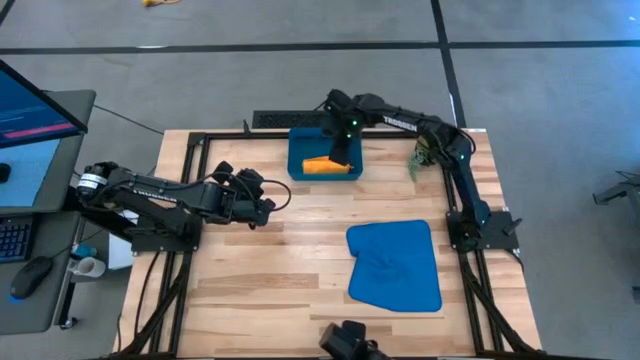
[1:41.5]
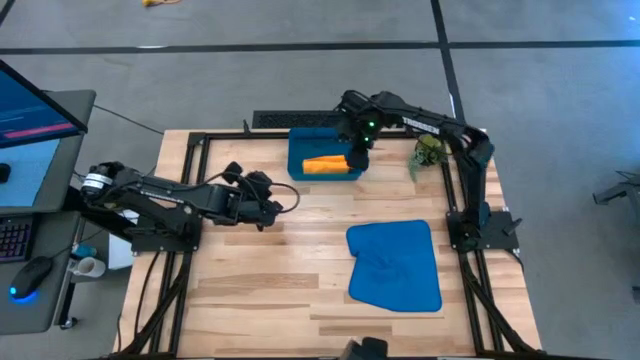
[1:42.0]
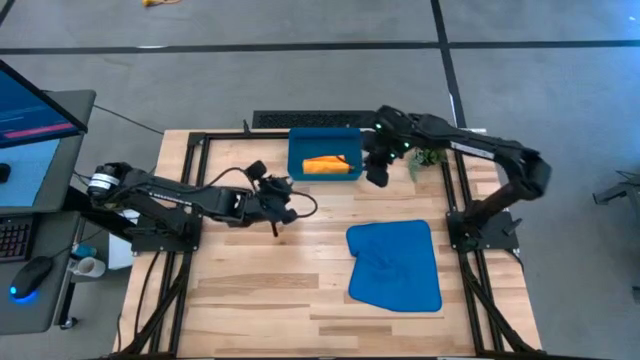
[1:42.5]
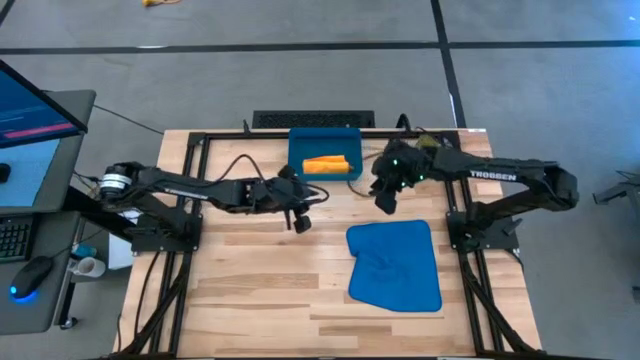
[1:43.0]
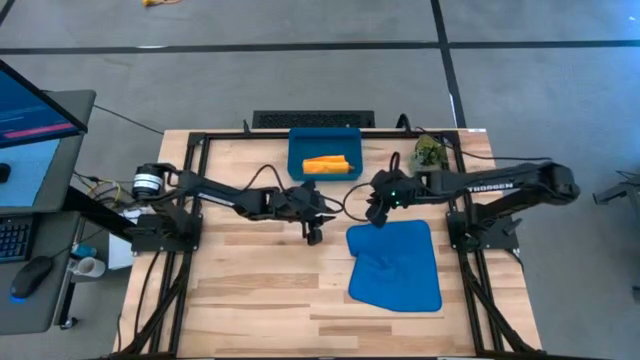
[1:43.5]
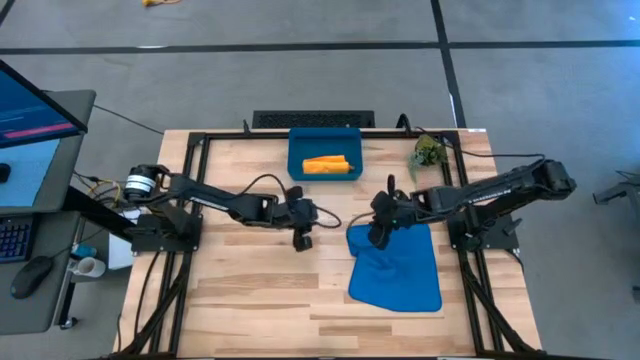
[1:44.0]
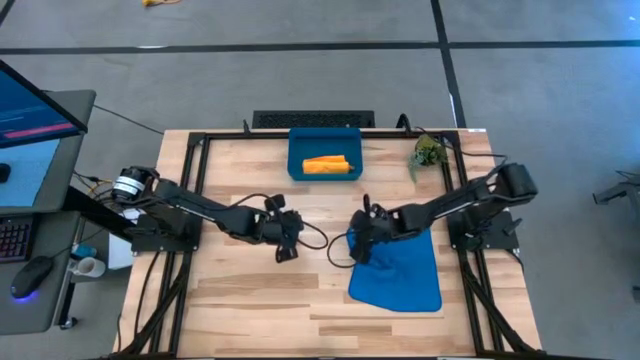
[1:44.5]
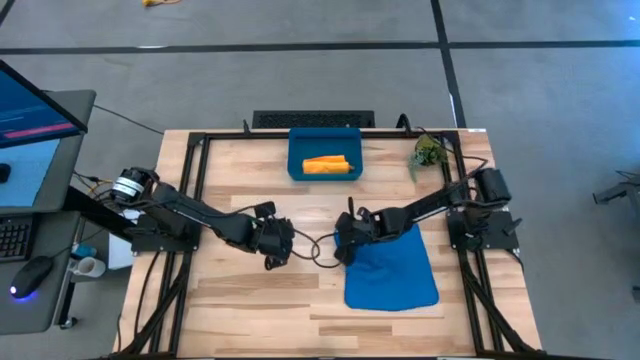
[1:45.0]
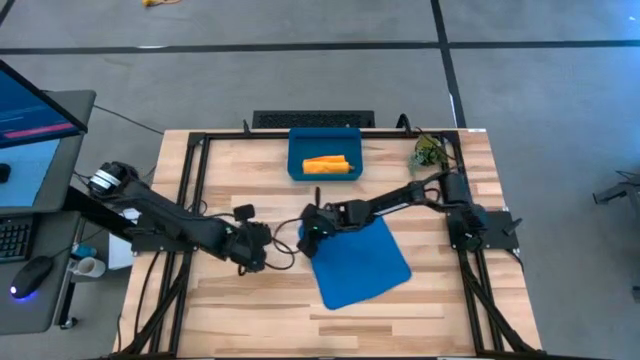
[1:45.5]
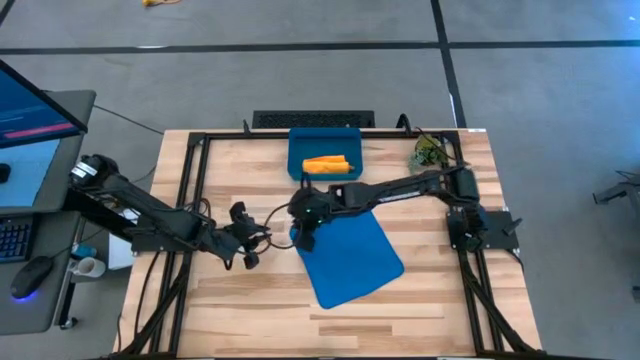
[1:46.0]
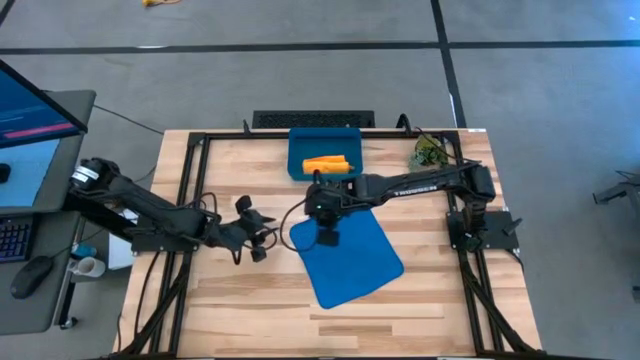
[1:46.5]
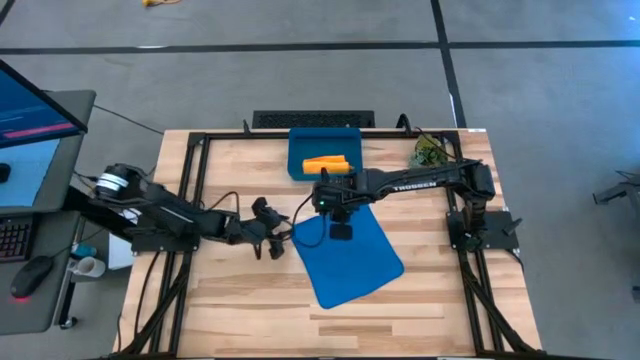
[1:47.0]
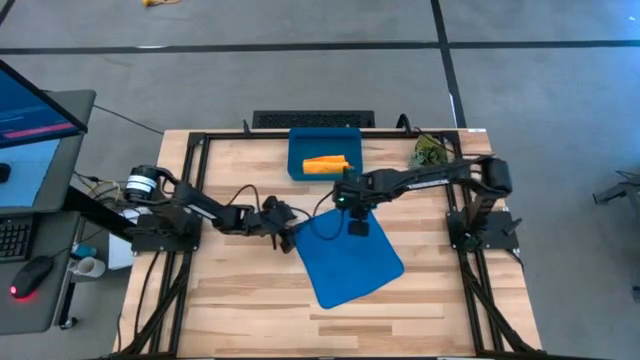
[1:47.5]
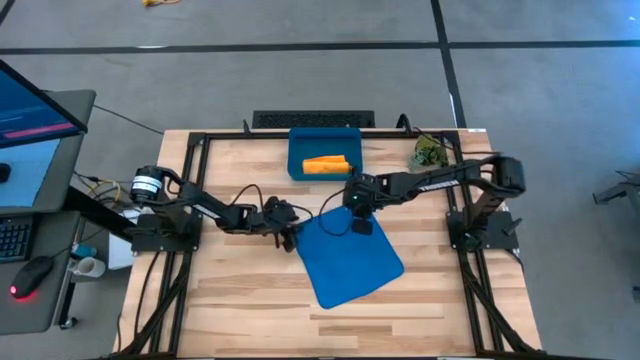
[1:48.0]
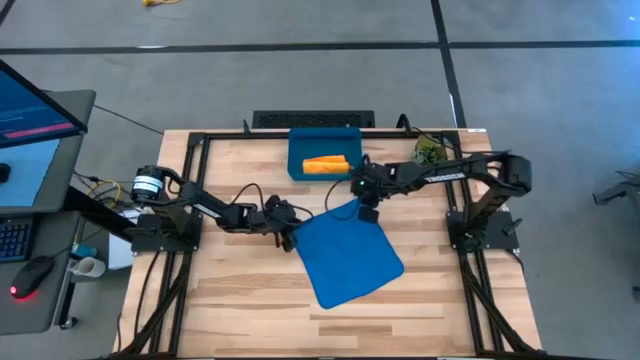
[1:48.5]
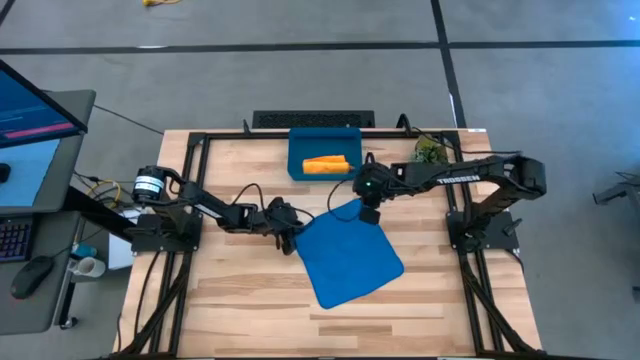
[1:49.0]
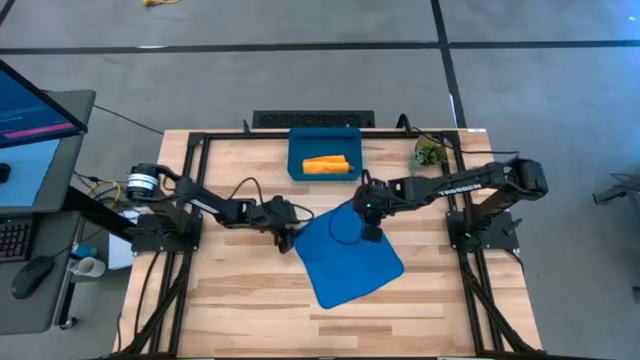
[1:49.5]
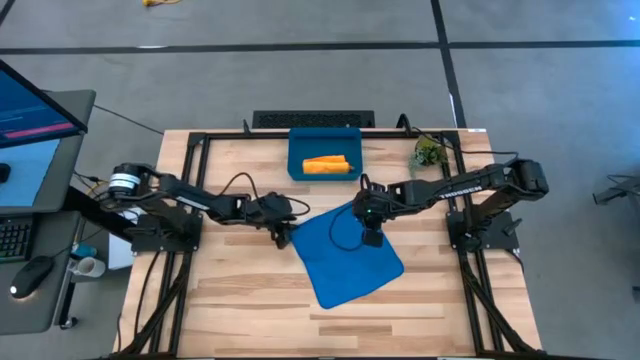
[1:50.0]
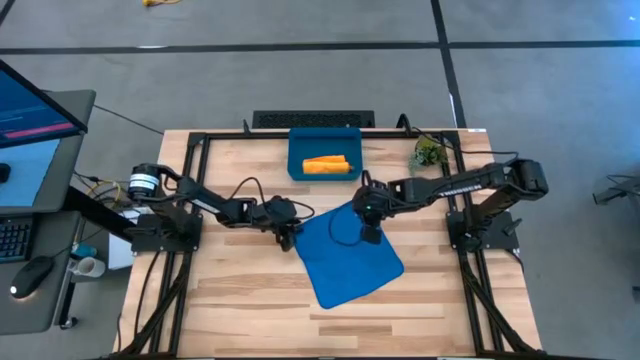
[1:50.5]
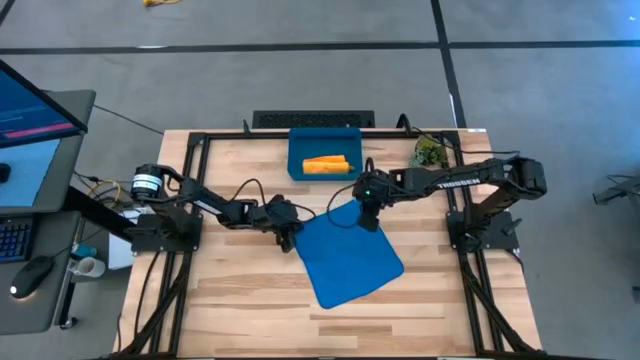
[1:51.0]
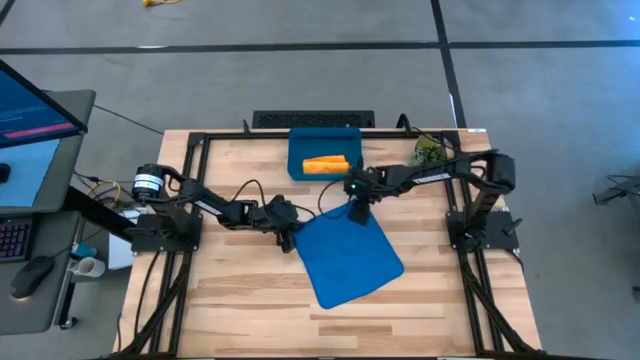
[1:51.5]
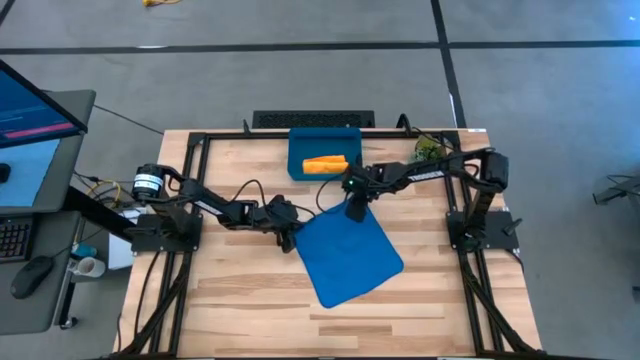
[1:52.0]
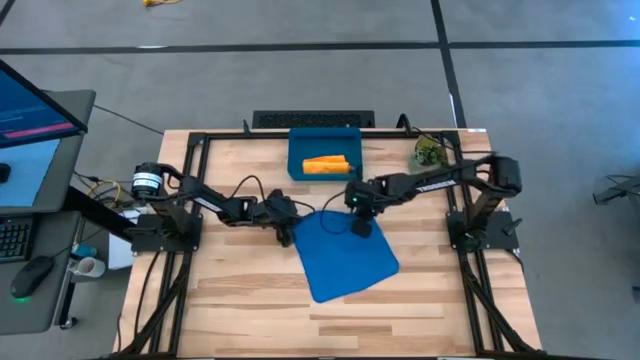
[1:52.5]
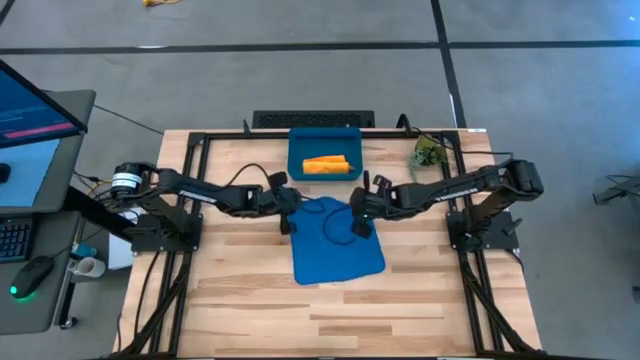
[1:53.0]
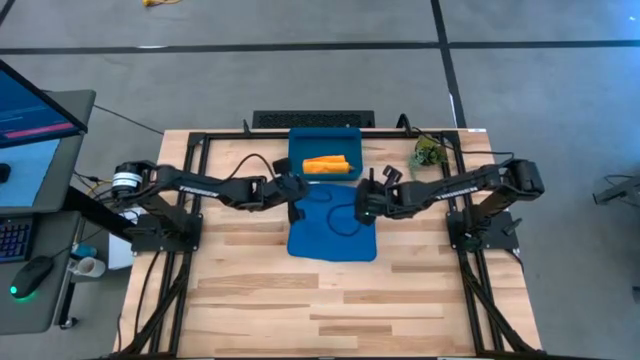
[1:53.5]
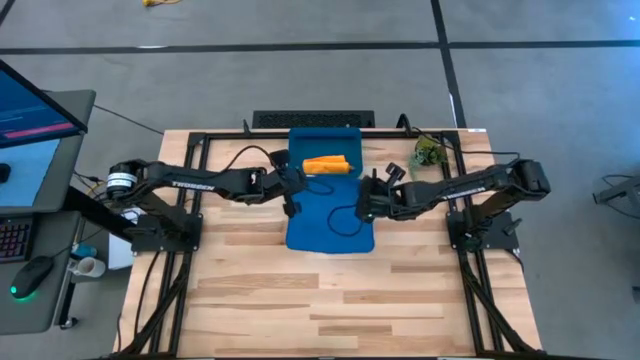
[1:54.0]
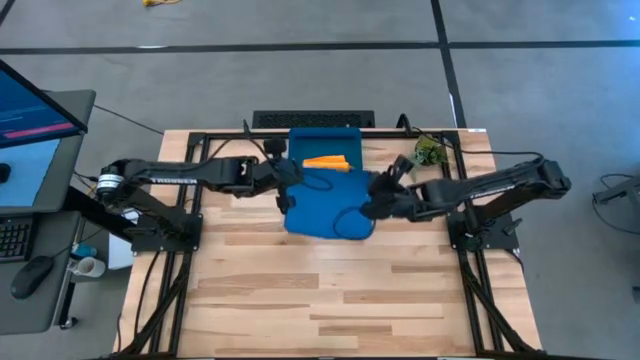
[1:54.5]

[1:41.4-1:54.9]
Task: Roll microfiber towels into tight, uniform cylinder then place into a basket
Fold the blue microfiber towel

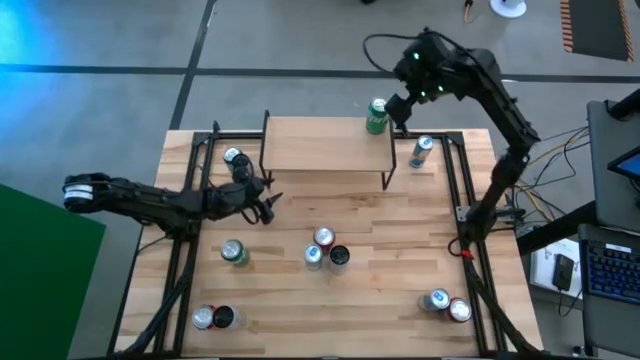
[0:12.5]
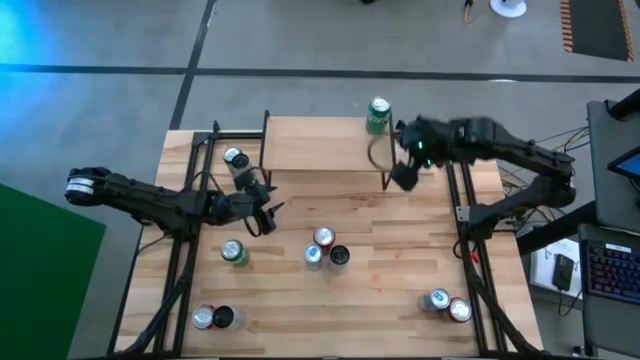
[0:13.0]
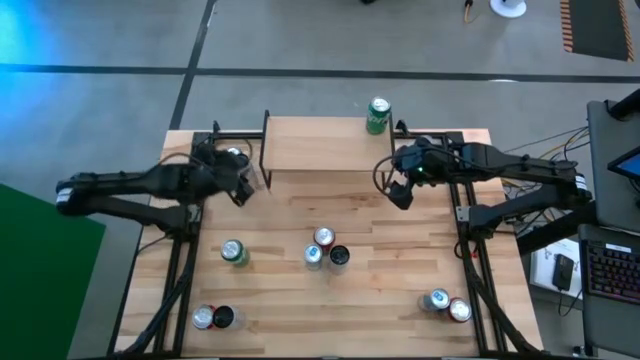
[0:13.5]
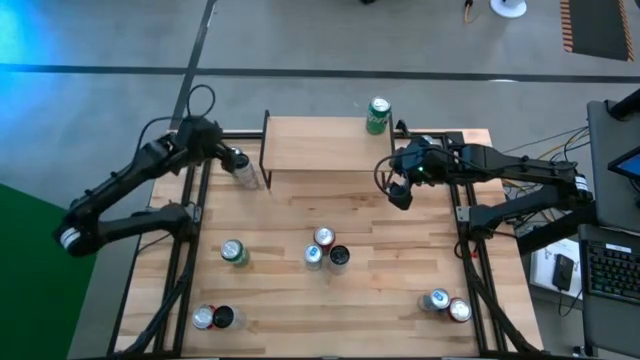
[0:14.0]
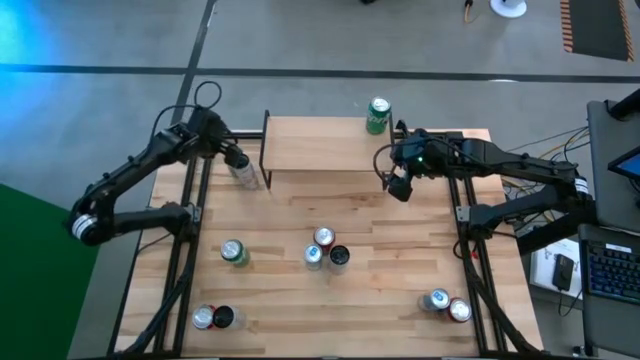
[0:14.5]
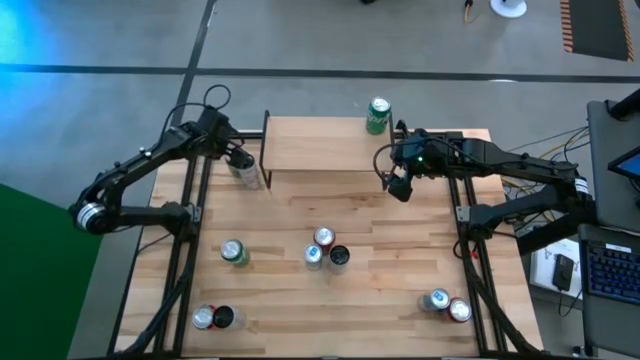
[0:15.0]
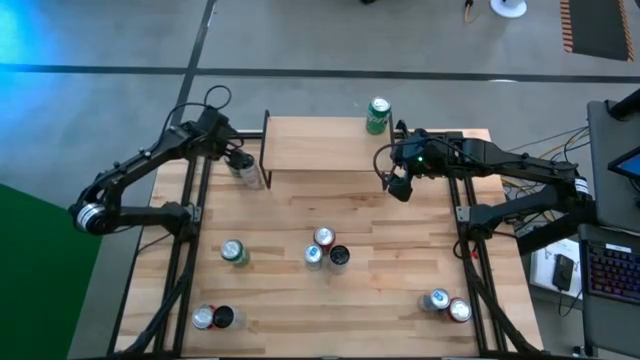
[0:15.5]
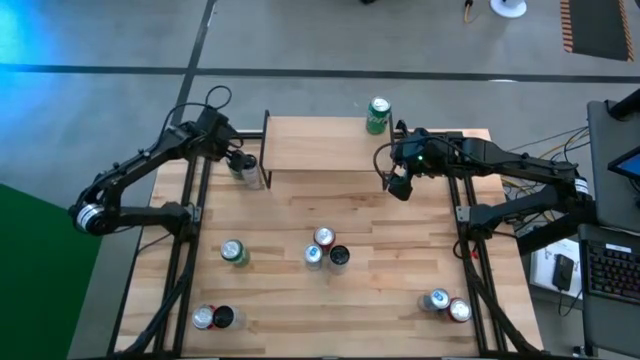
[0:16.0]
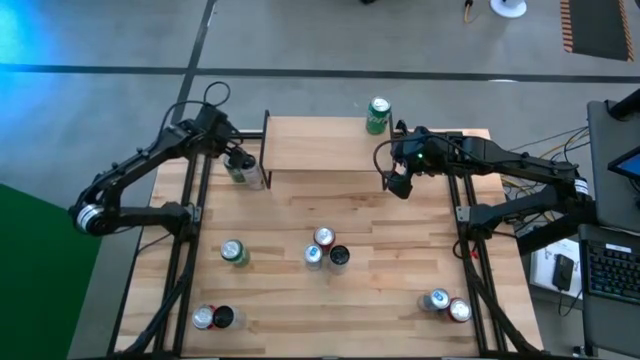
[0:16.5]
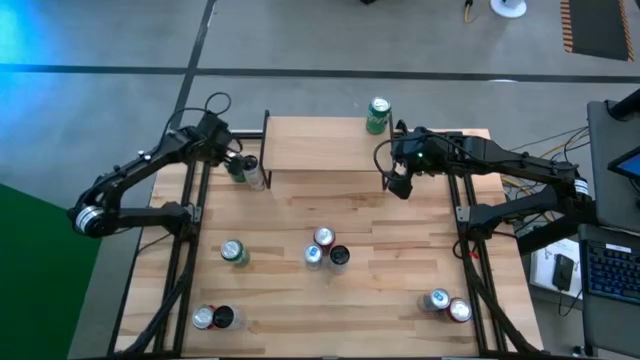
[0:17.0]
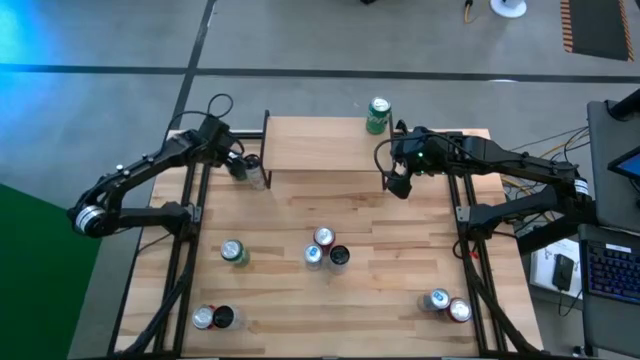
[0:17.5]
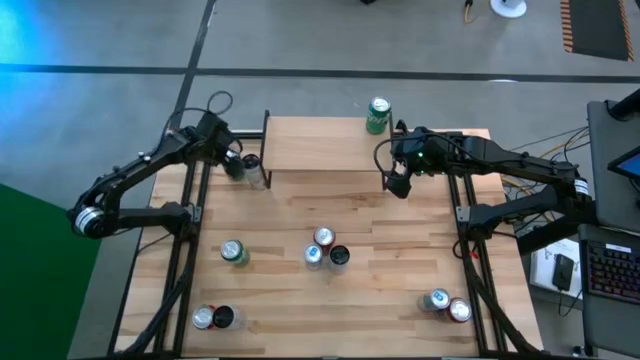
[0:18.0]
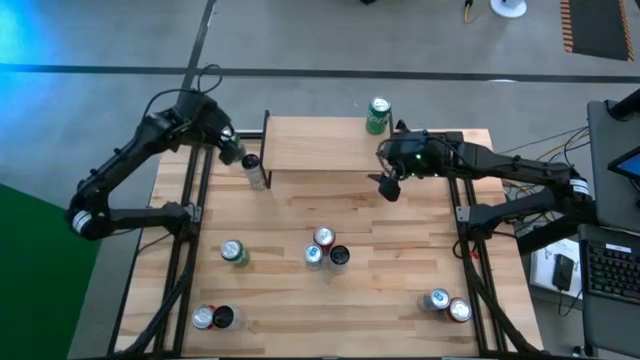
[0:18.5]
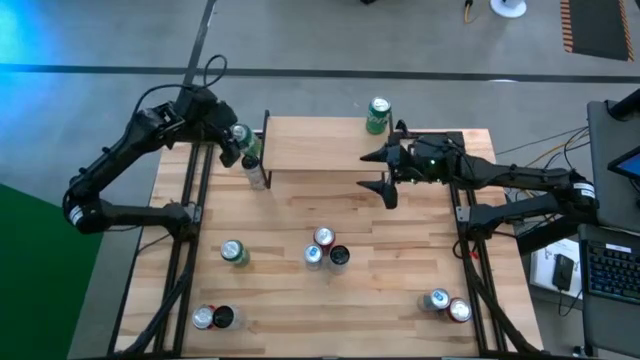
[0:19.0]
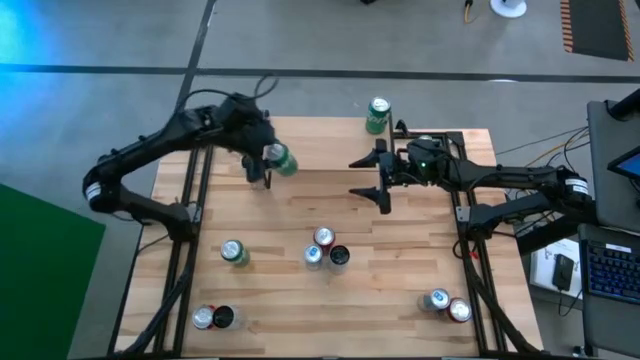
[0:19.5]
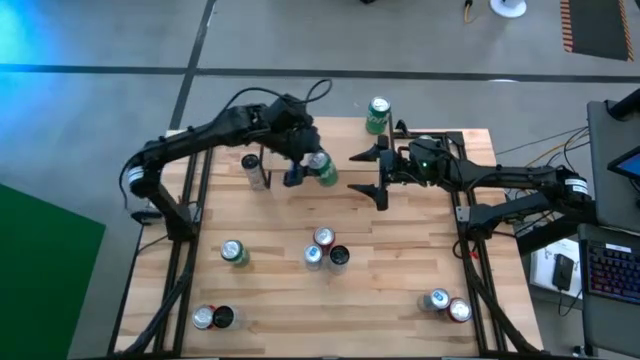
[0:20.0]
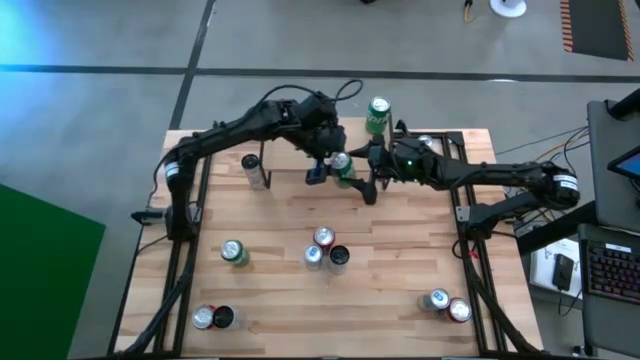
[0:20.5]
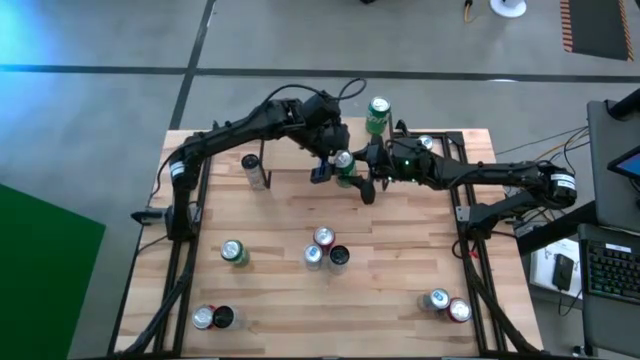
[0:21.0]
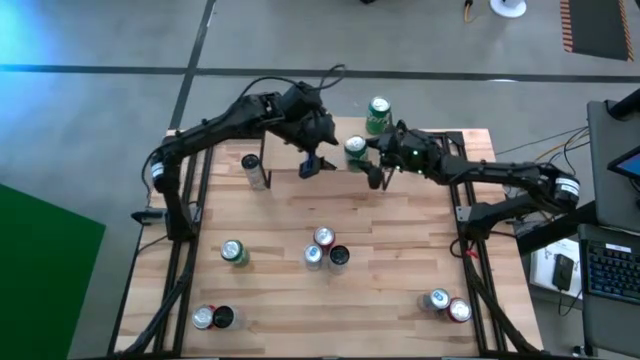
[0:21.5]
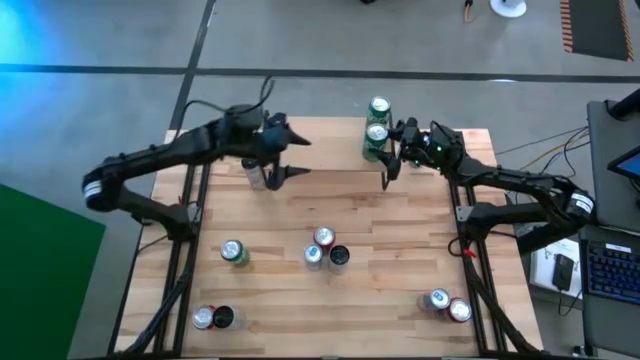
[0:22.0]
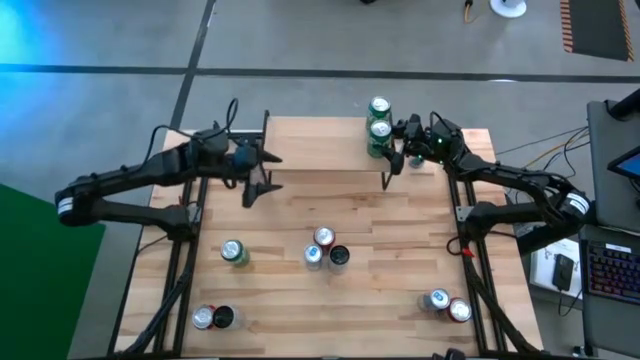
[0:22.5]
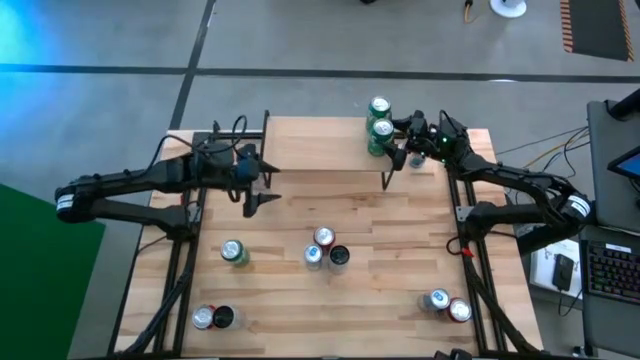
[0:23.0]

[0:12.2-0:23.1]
Task: Place canned beverage on shelf
Put the top green soda can on the shelf on the shelf aligned with the other green soda can
